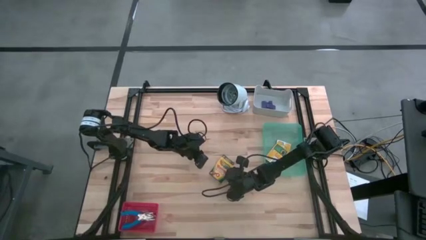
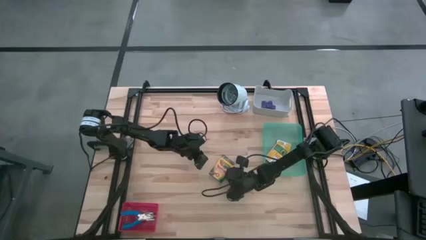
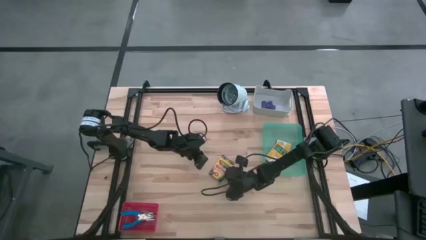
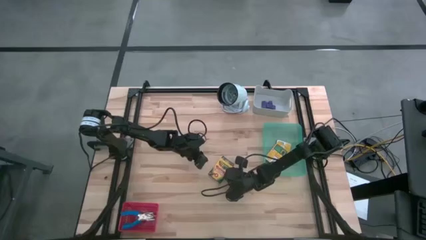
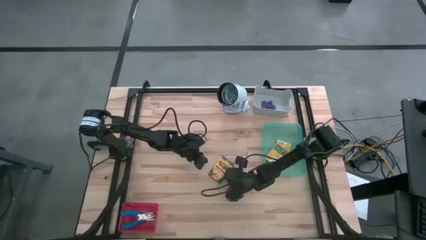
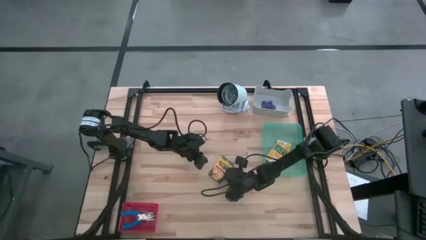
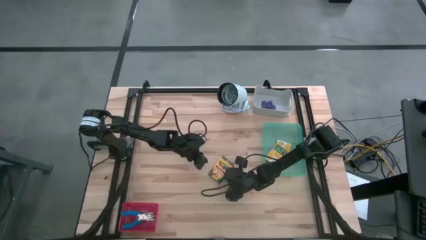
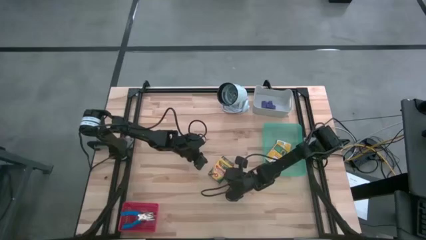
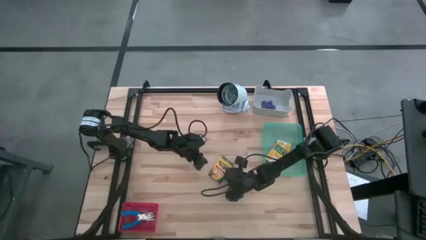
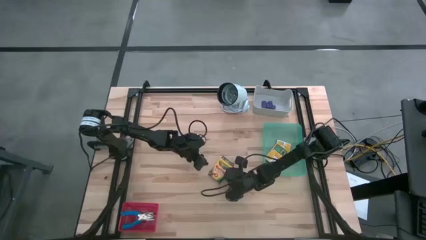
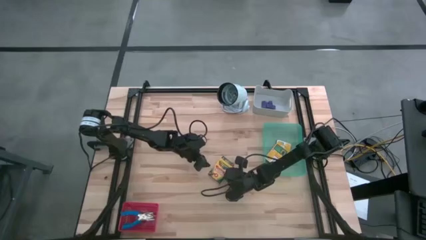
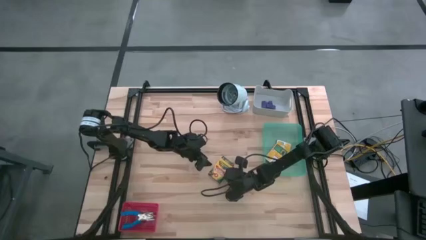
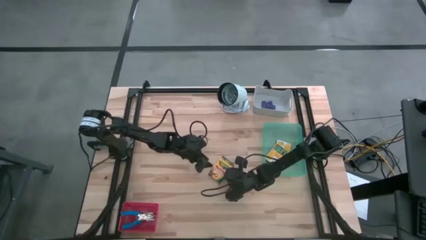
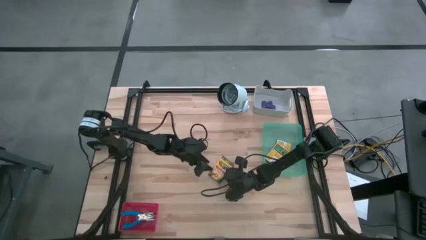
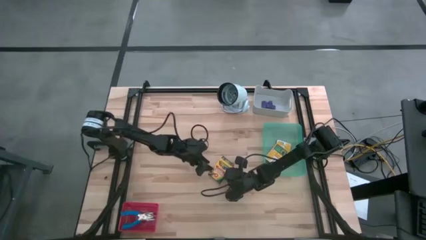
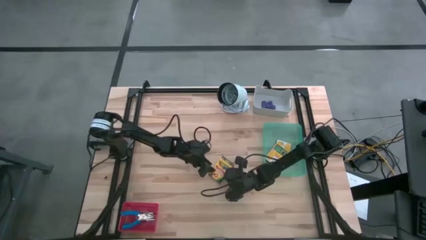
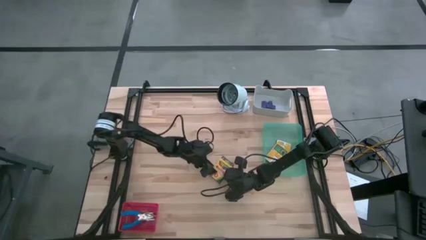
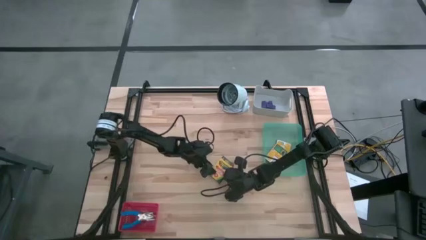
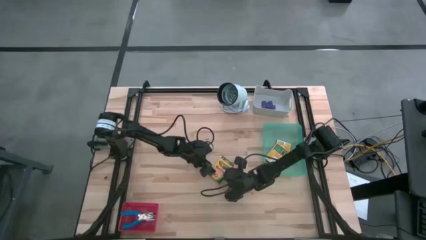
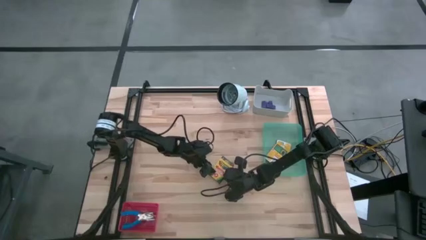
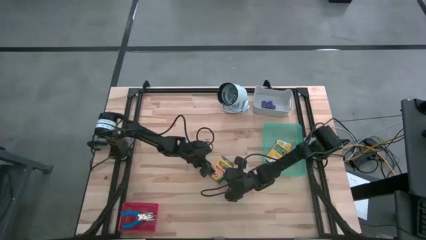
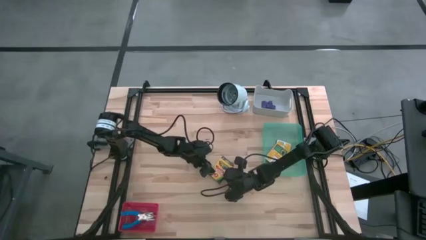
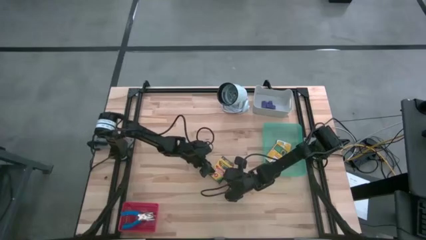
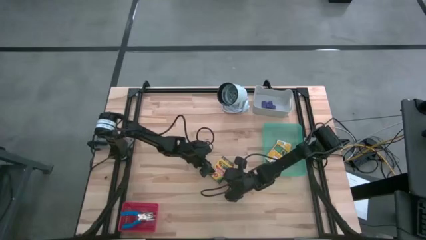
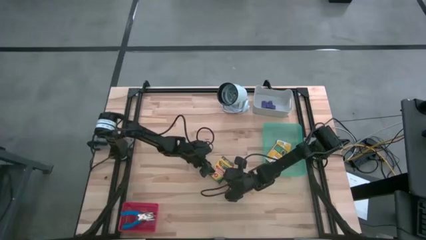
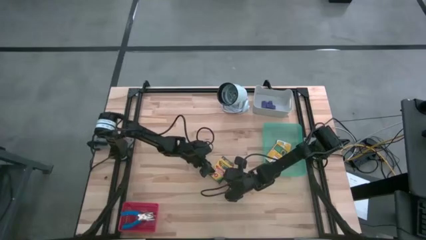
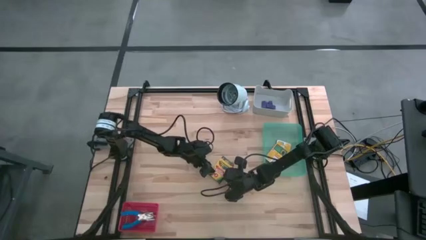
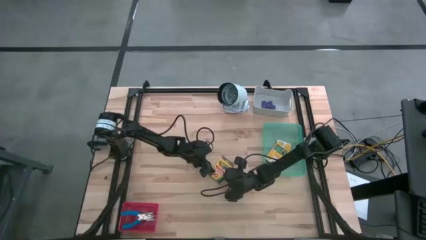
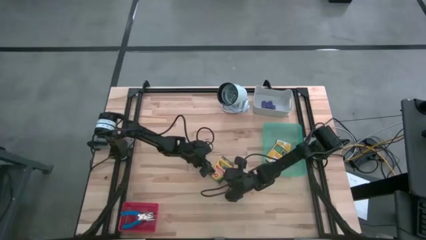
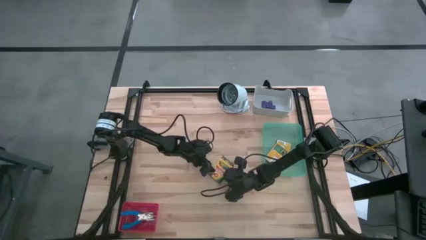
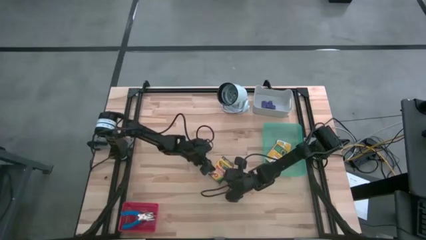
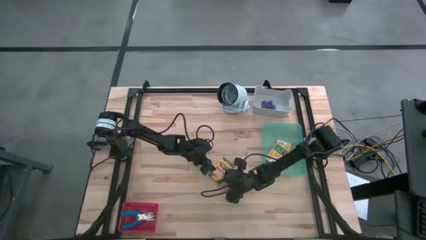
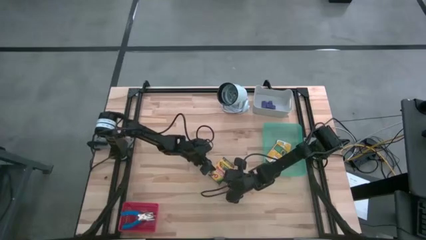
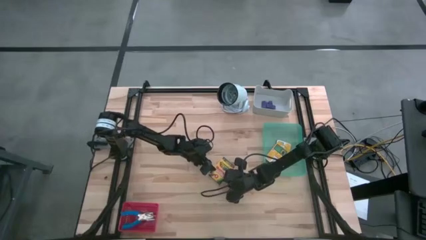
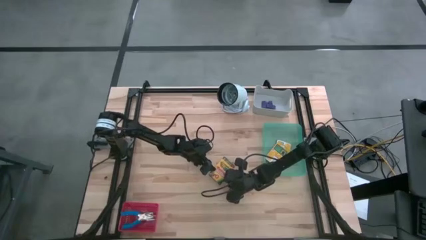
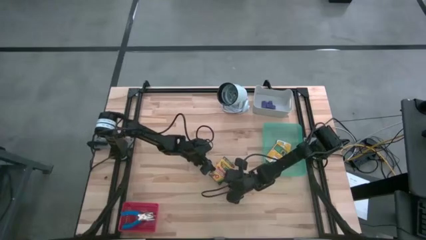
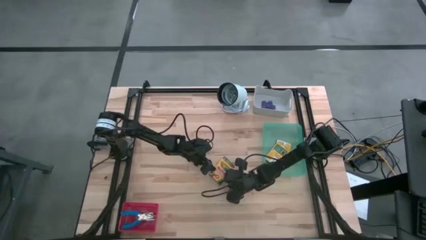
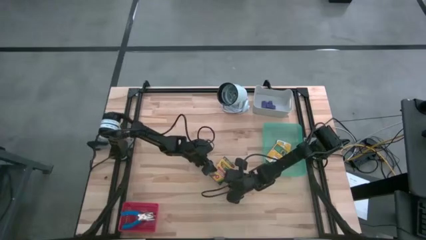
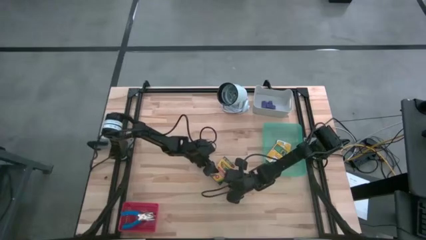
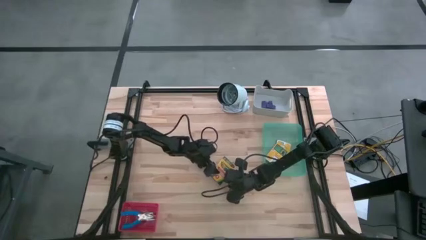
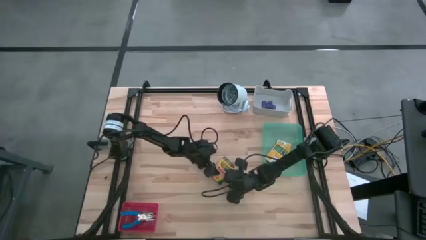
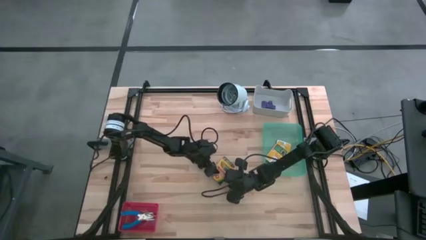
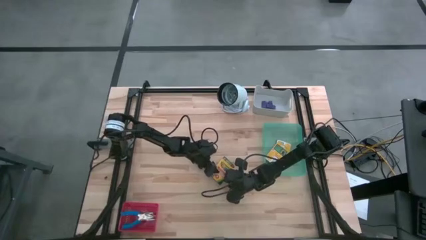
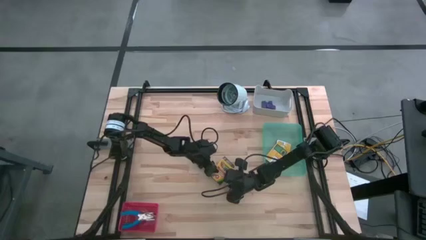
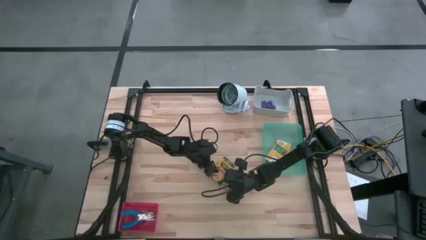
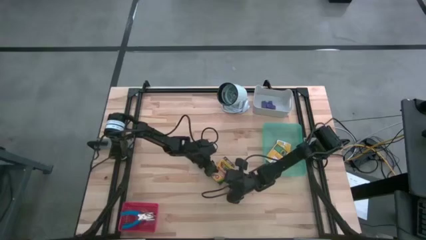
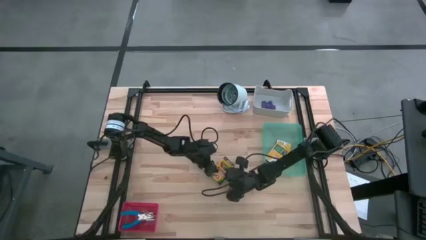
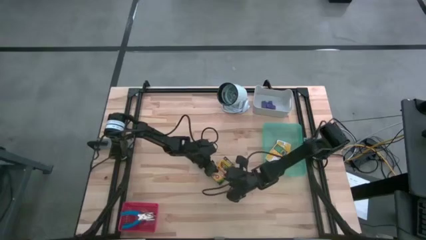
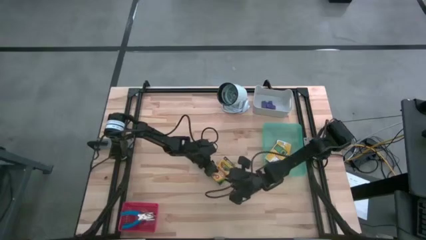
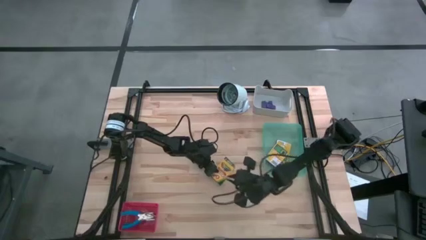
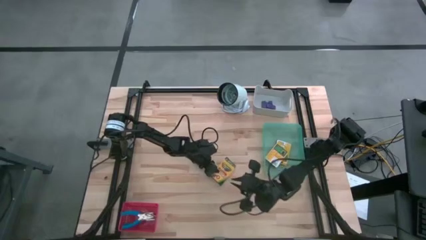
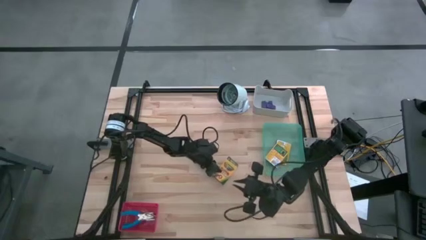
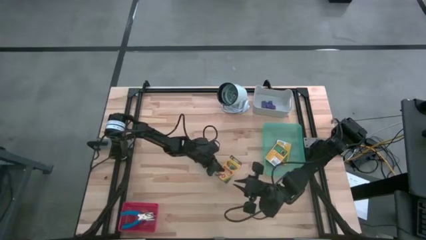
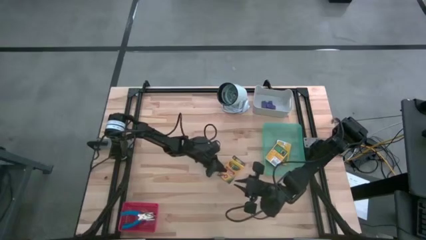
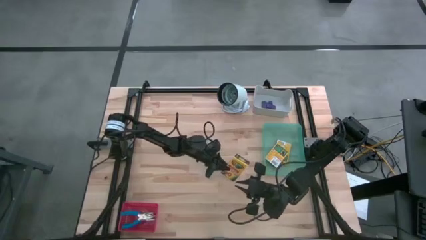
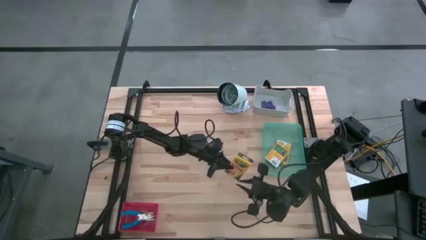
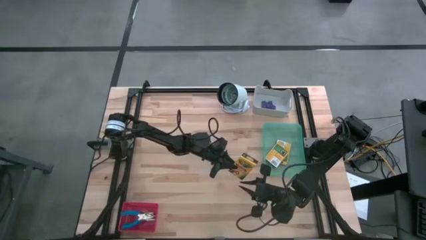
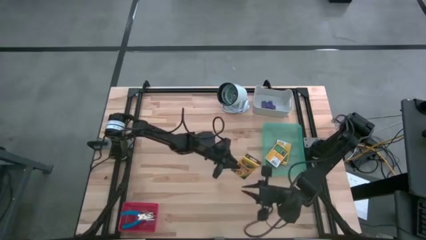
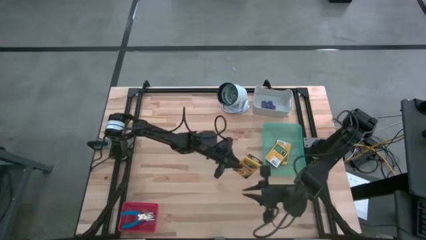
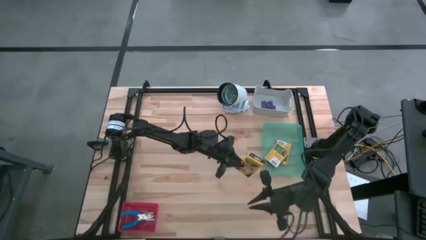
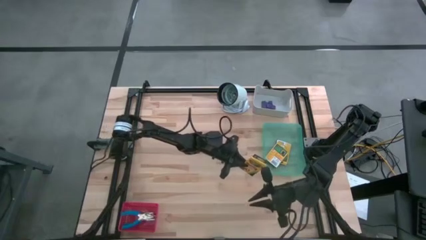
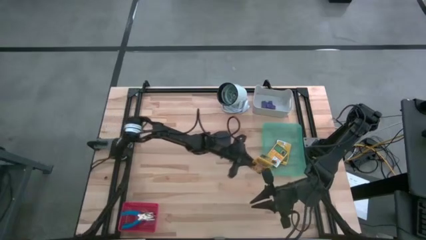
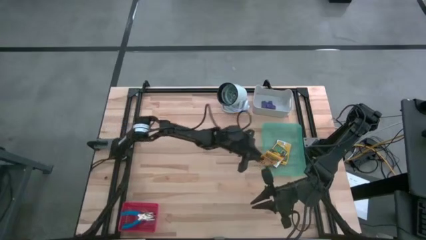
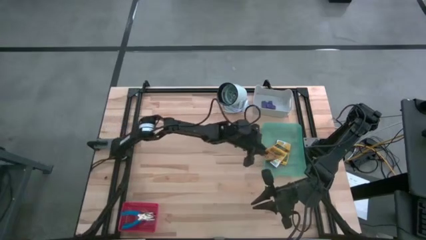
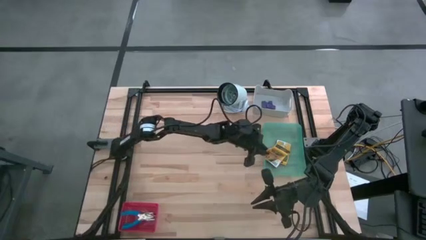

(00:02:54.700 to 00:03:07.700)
Task: Pick & Place School Supplies
Put the crayon box into the green bin
